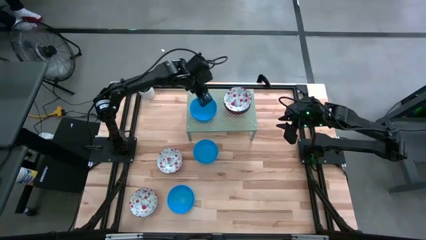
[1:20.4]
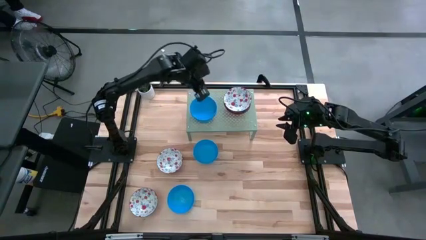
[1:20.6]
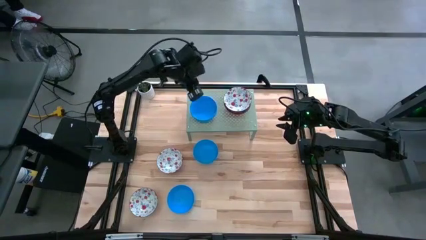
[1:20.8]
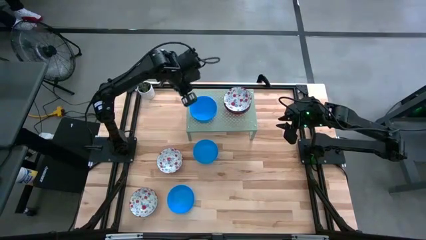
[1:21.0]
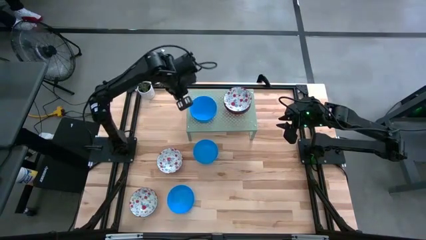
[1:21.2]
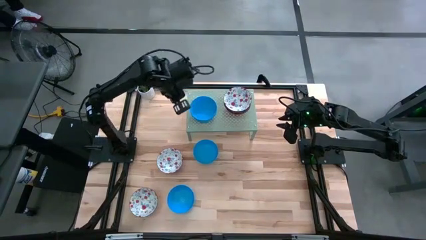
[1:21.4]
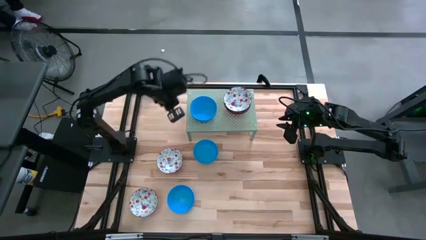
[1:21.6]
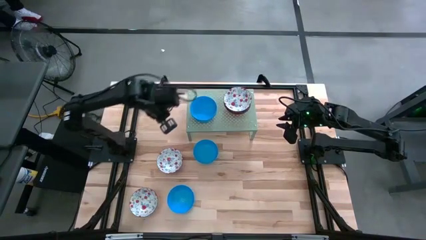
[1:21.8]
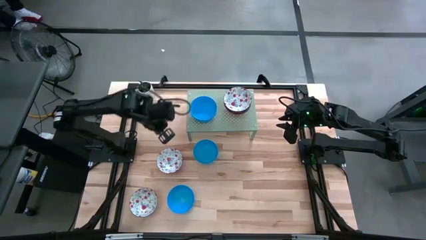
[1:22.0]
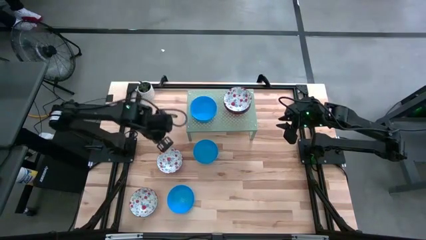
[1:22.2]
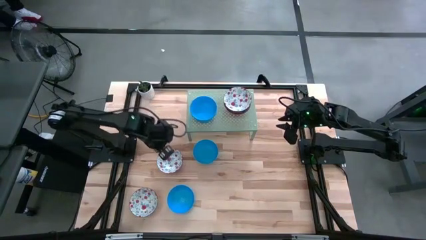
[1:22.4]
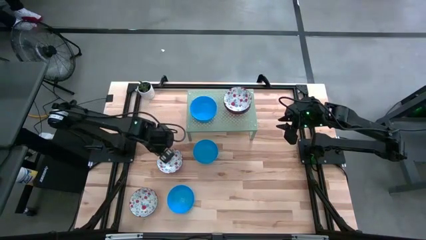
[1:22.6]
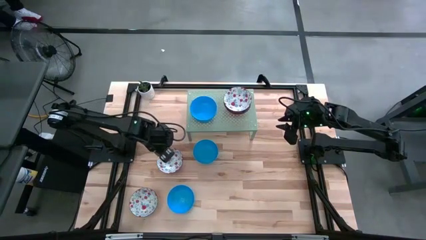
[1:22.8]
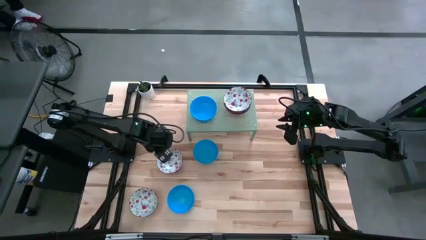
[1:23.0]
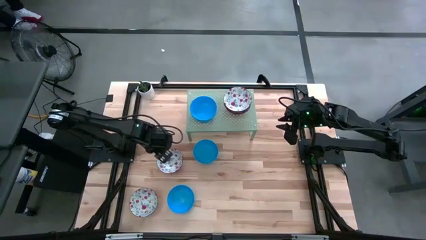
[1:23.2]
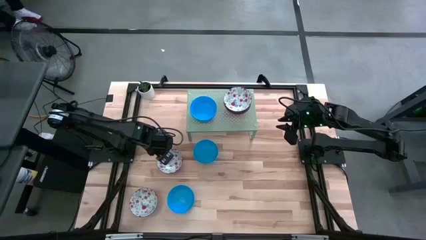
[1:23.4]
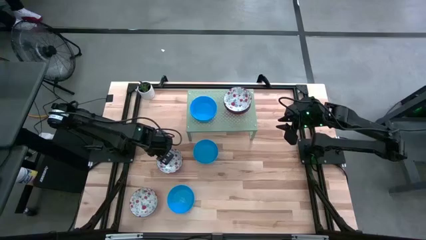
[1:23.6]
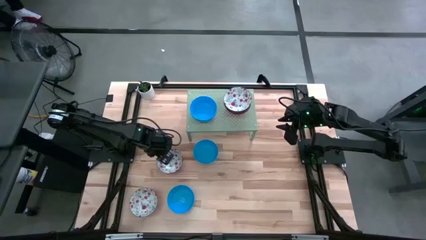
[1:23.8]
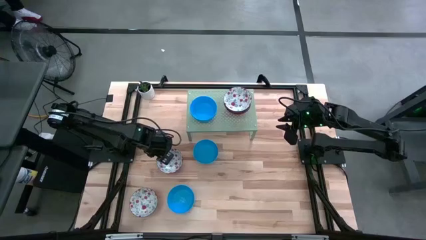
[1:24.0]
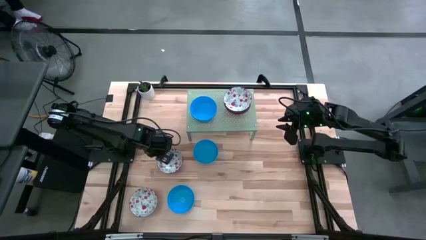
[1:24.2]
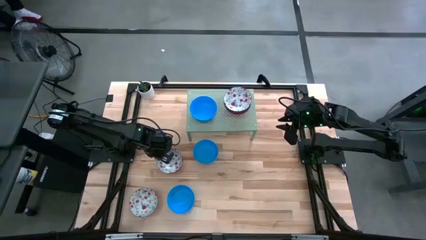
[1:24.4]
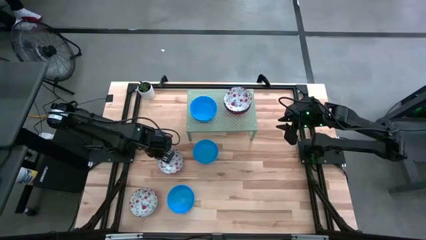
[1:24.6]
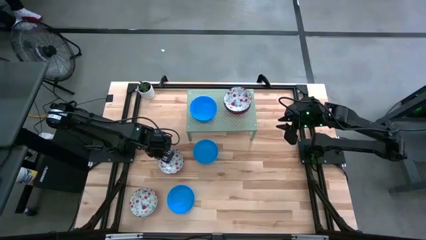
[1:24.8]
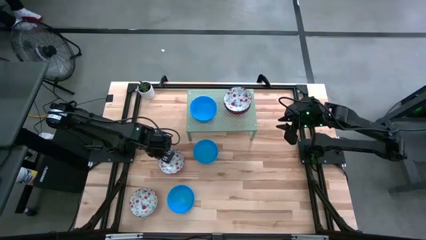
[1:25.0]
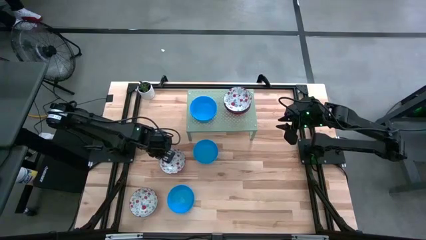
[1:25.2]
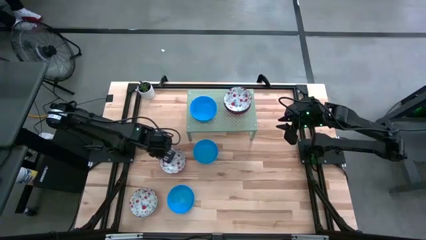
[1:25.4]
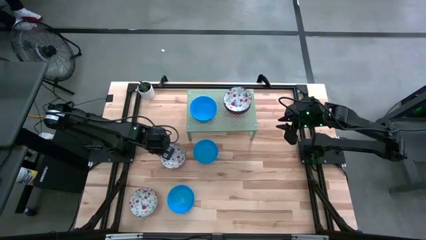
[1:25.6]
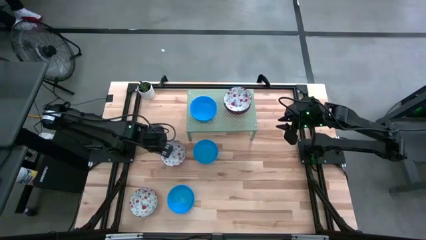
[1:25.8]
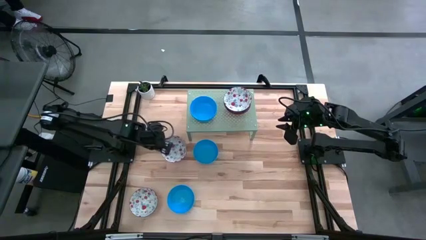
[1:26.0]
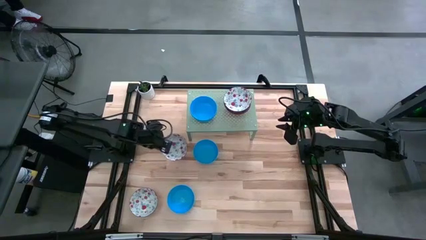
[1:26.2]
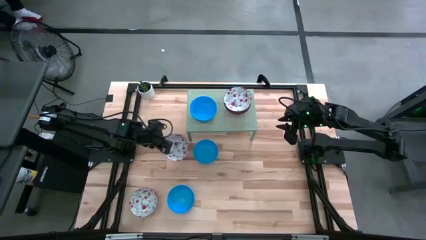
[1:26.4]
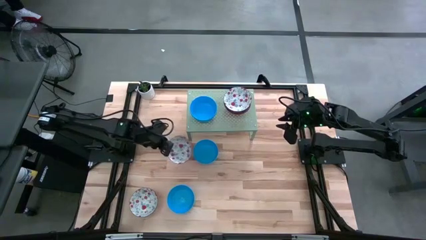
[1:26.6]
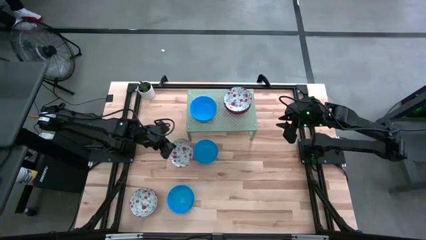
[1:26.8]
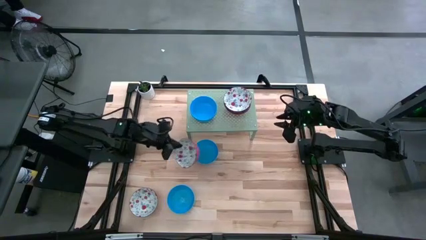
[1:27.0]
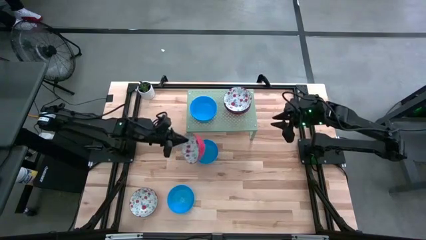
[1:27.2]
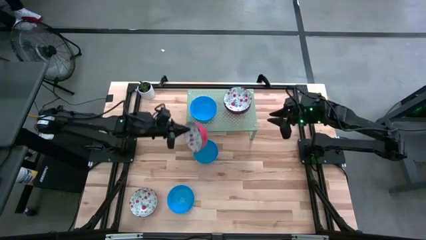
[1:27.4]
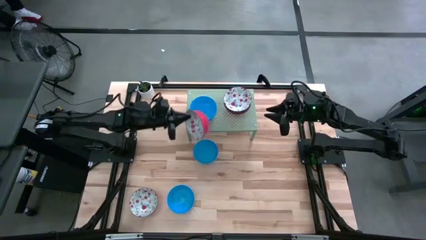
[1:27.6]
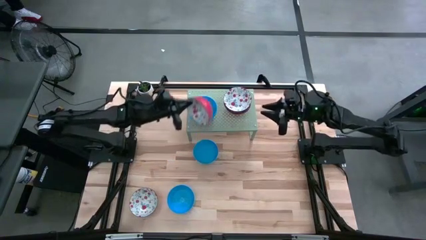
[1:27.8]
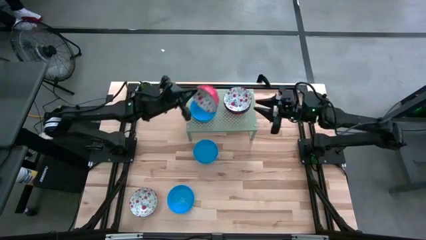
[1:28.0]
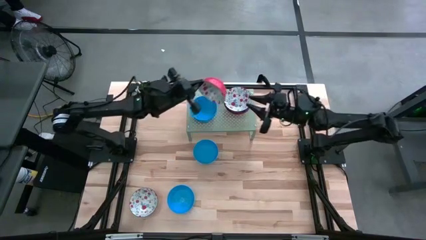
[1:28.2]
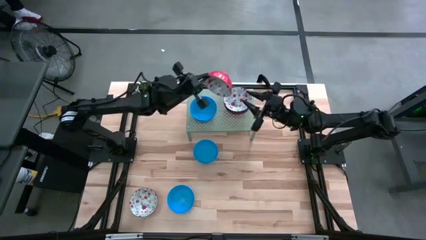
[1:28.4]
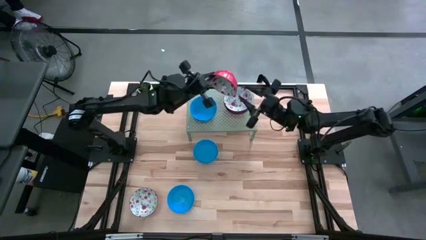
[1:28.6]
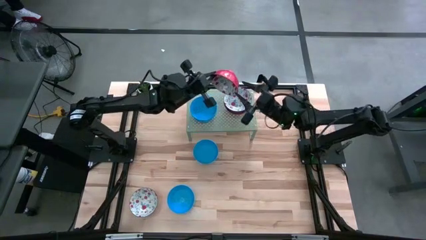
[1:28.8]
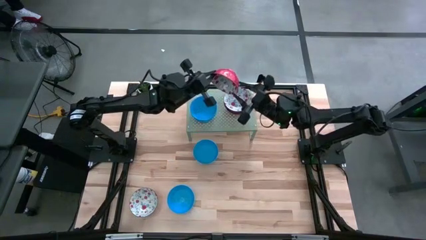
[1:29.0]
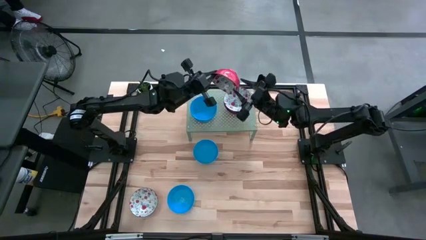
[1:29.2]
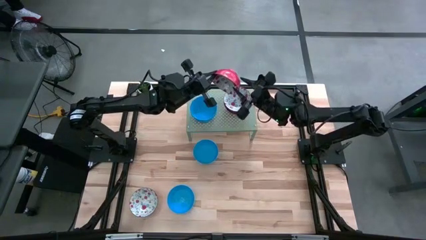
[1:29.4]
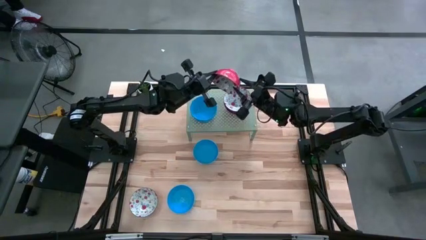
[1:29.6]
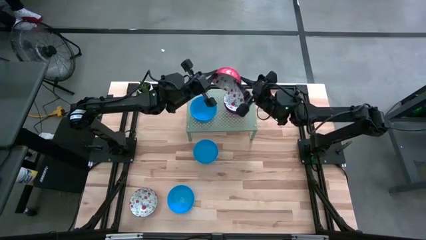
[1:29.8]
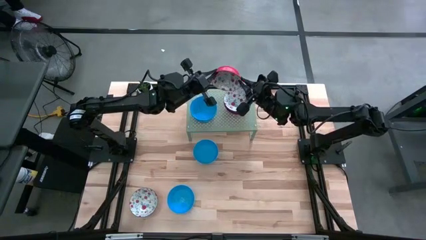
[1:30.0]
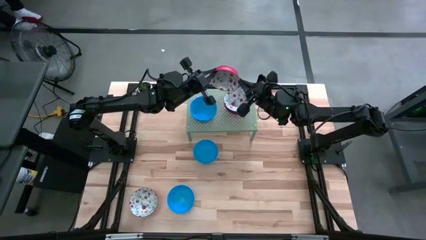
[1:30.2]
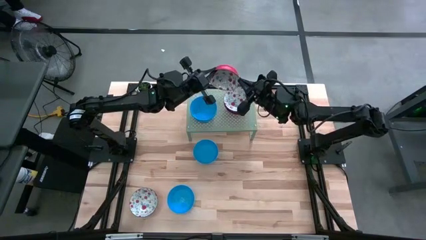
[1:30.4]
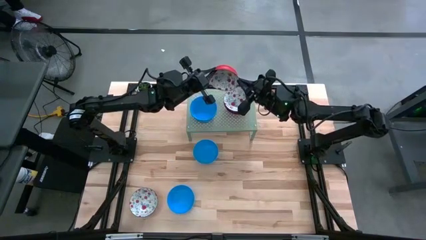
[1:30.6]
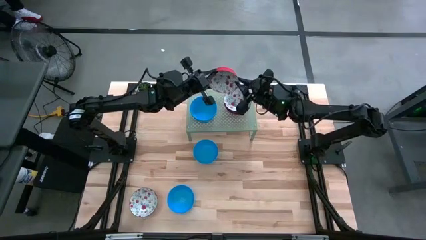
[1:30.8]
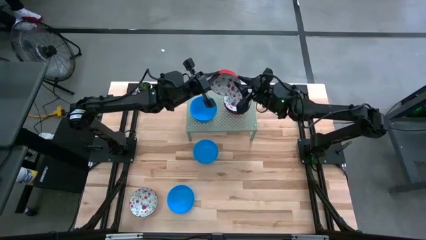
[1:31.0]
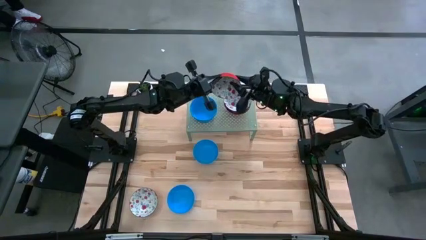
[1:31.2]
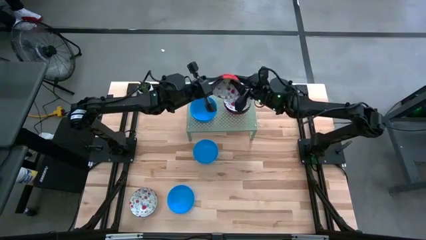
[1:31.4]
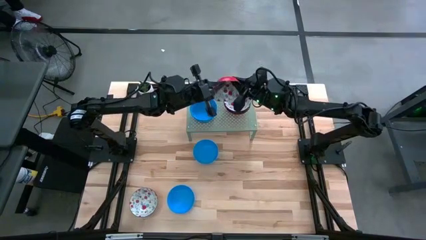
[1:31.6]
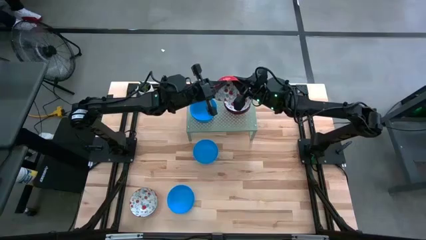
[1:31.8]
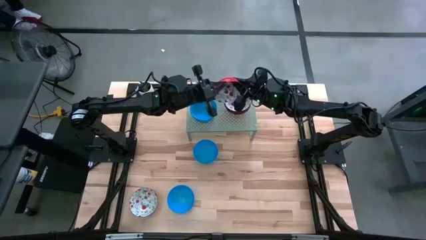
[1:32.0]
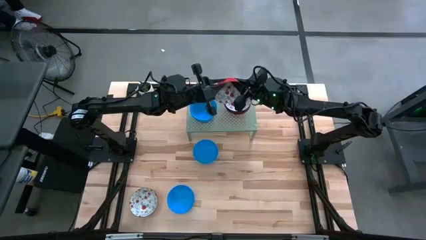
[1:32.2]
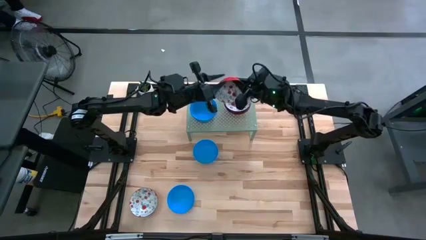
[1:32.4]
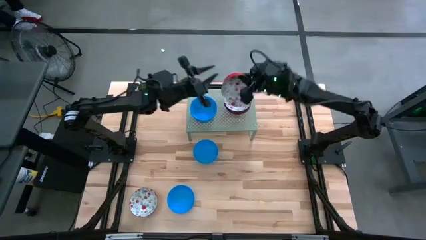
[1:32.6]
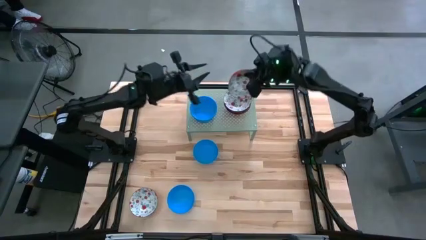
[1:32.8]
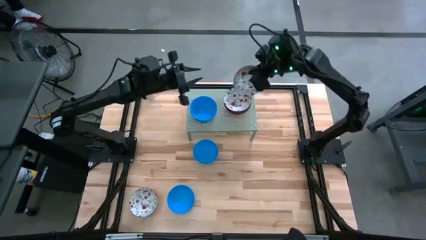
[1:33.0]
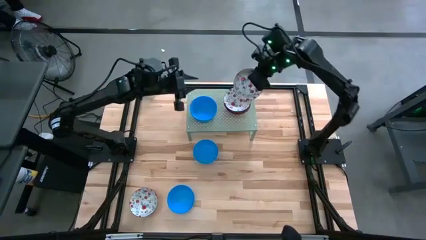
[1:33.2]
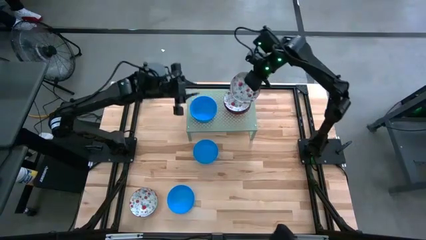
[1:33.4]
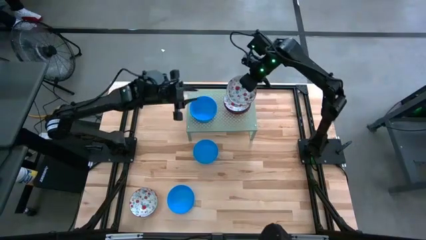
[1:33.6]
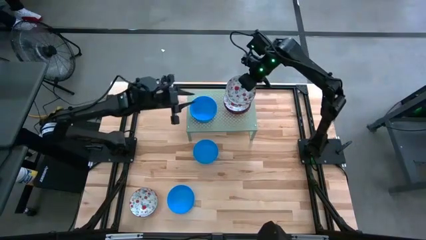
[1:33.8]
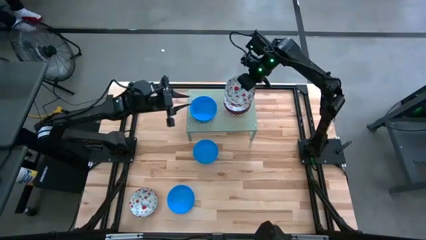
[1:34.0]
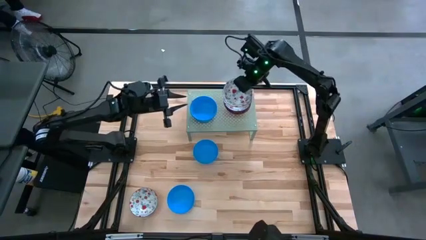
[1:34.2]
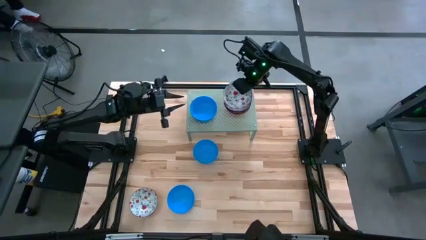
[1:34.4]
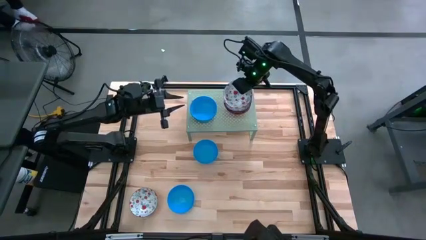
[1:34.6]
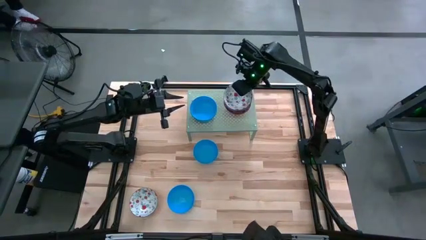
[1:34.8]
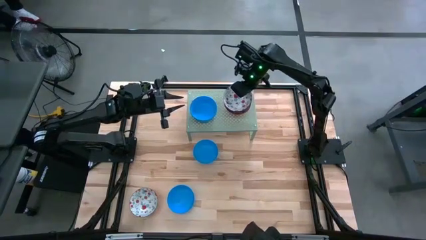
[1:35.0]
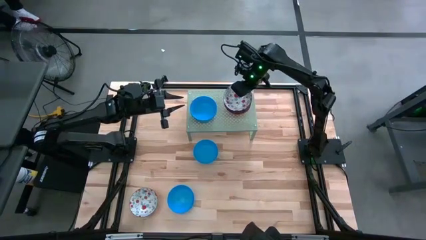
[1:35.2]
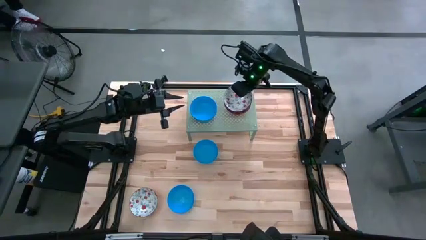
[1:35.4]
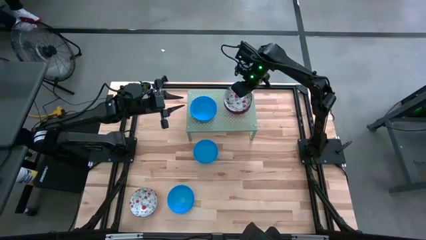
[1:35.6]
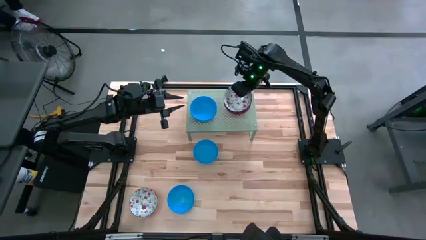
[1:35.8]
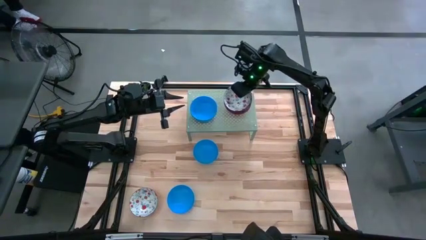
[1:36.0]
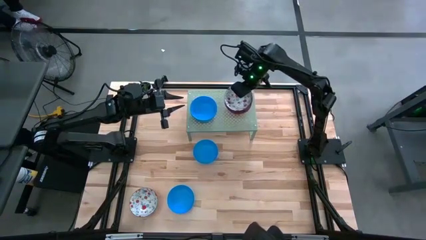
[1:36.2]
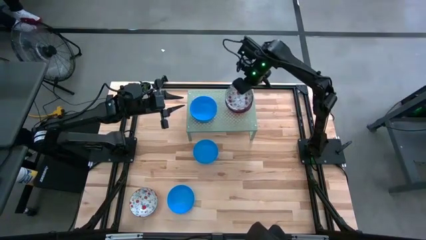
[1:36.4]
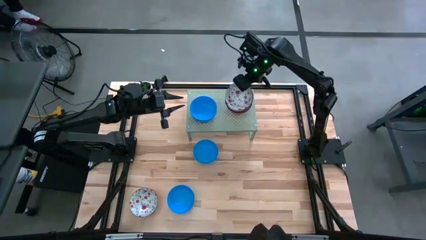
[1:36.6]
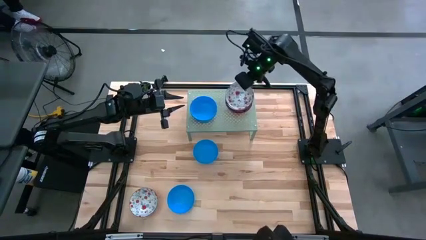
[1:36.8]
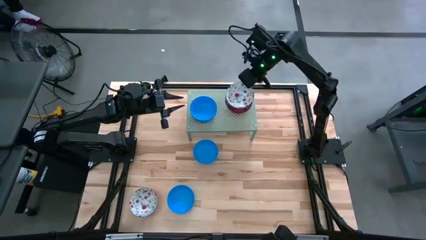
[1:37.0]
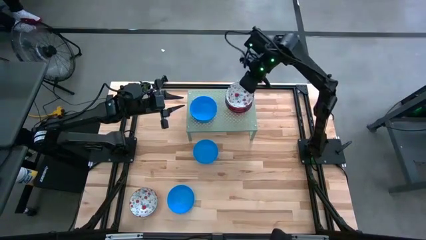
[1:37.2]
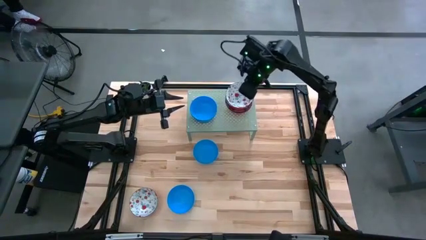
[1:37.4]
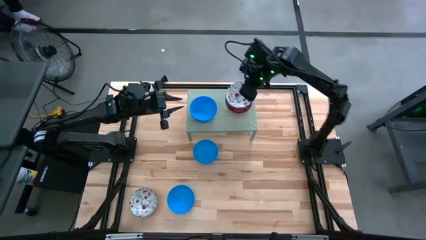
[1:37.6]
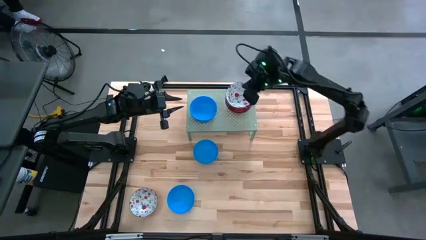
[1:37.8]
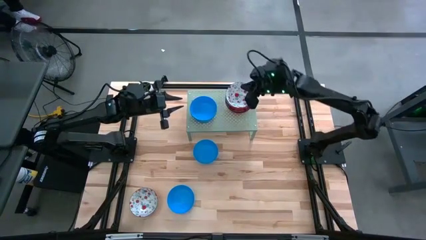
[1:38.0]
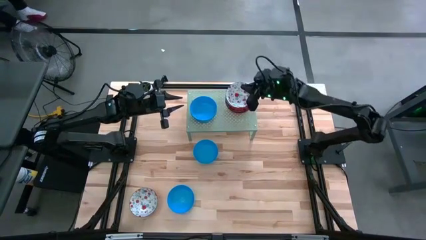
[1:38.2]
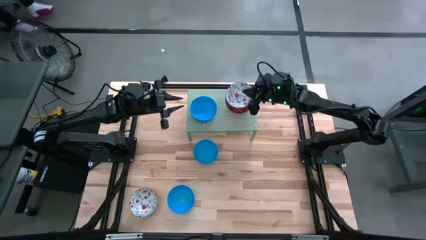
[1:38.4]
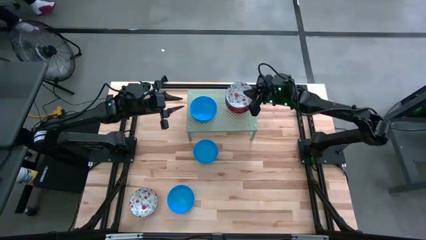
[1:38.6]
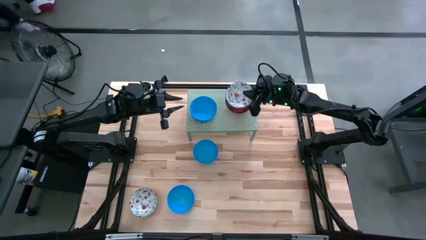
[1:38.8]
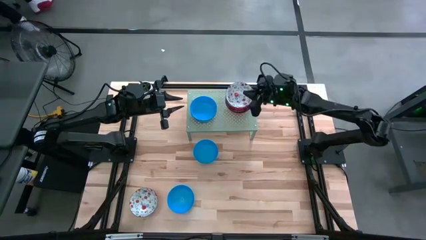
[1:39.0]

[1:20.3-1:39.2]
Task: Pick & Place Mini bowls
Stack the red bowl on top of the red bowls on the shelf
